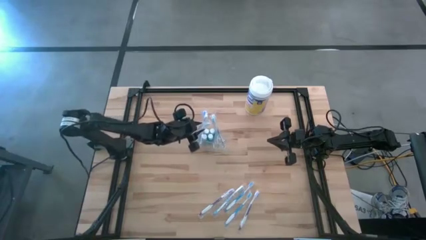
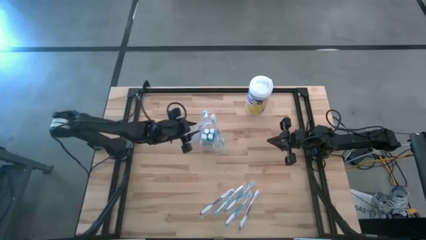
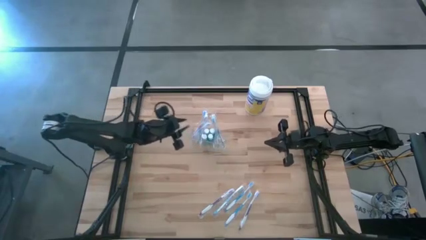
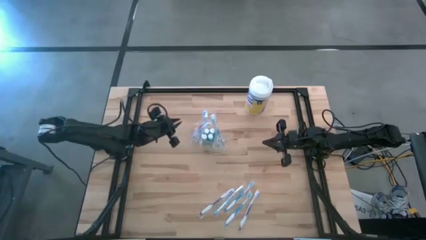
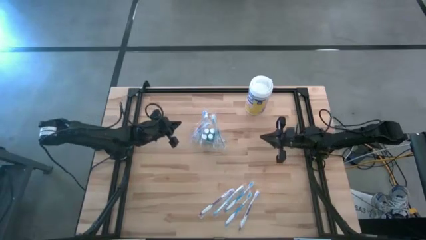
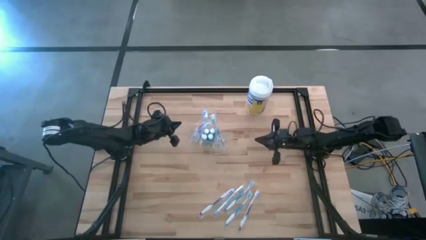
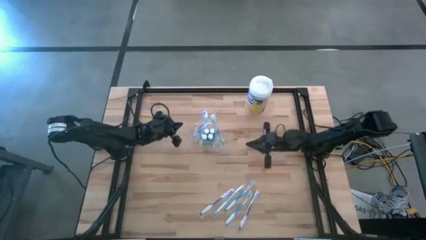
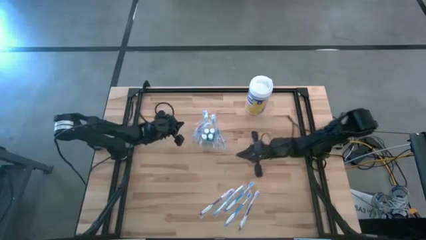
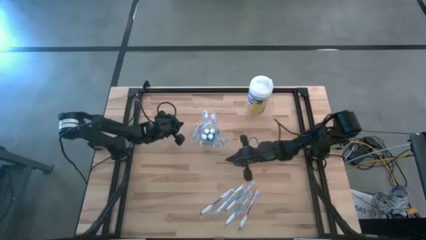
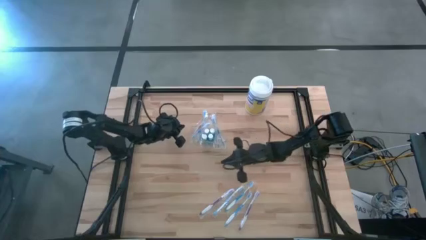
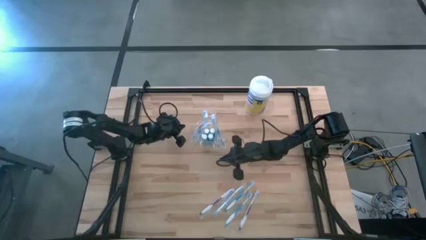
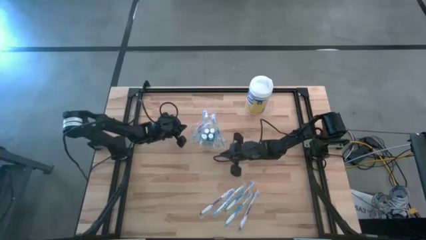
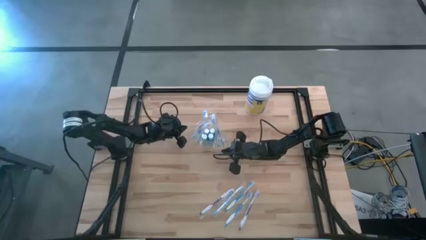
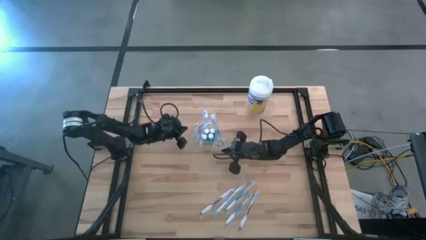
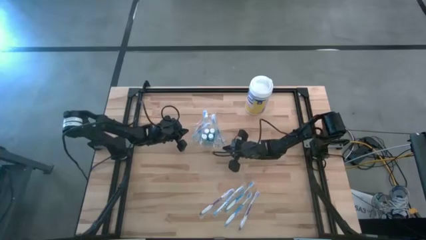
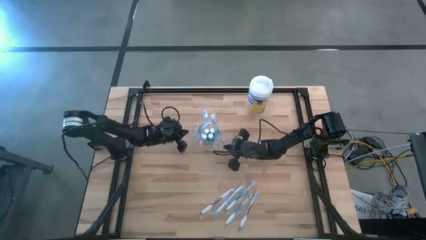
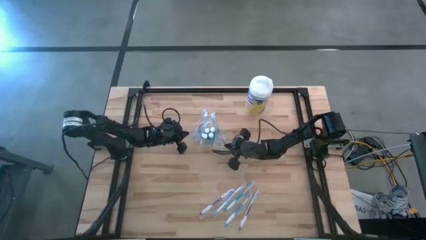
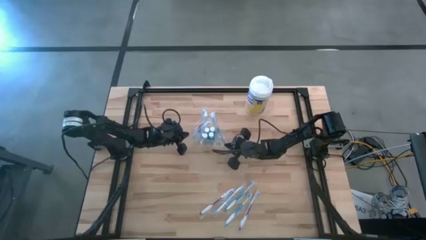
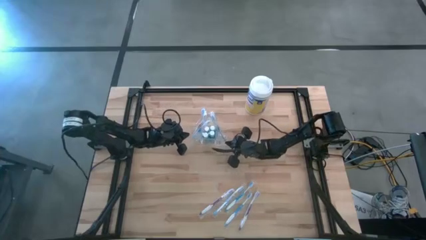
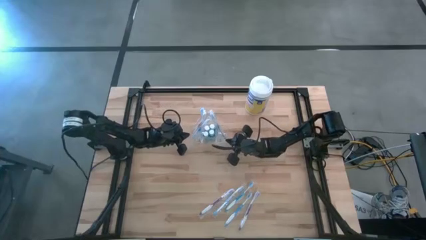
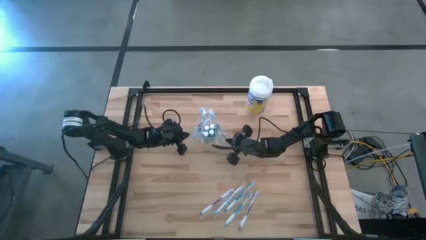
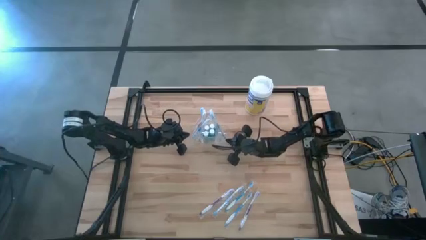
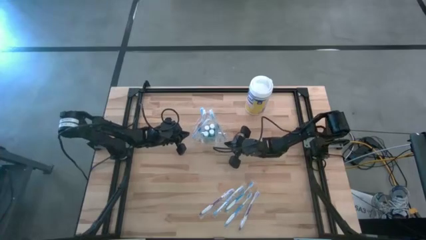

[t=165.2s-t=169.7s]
Task: Pick & Place toothbrushing station
Adjust the transparent organizer

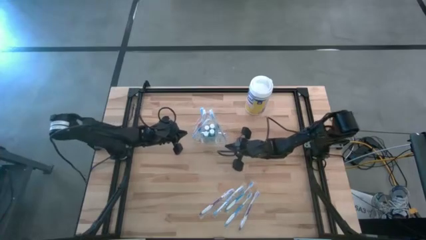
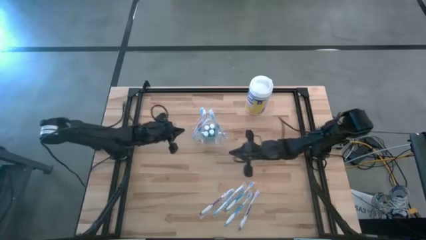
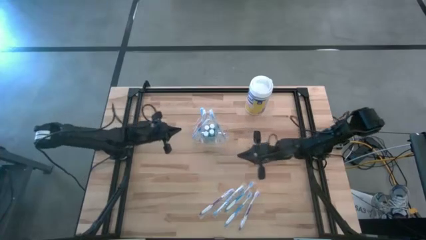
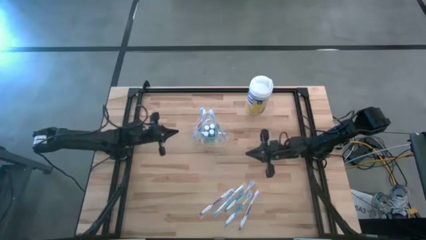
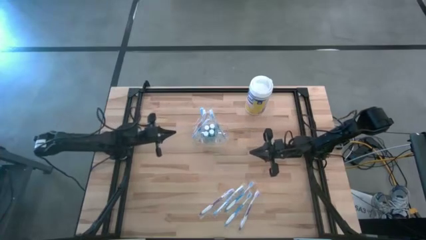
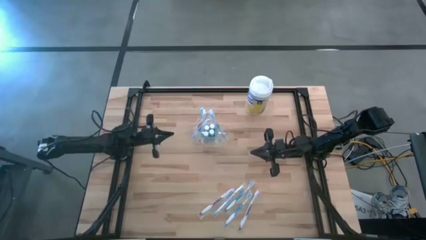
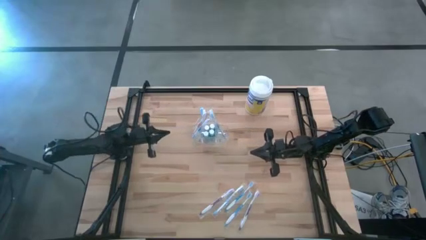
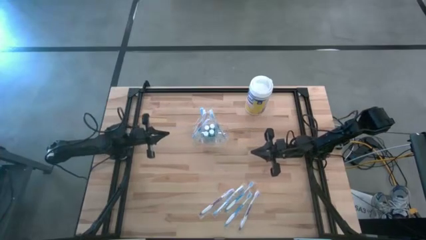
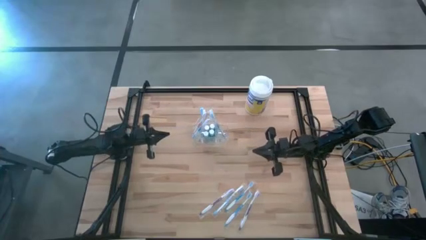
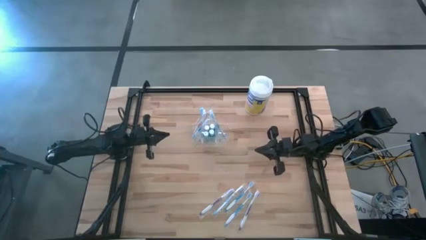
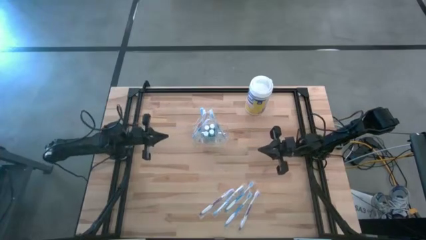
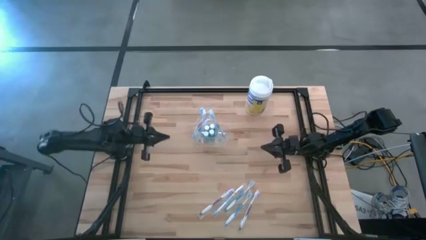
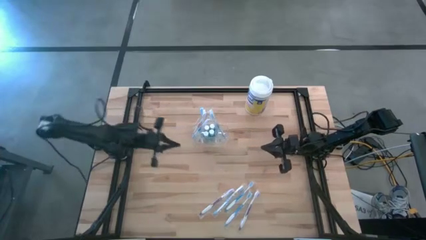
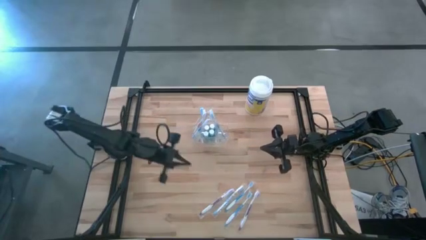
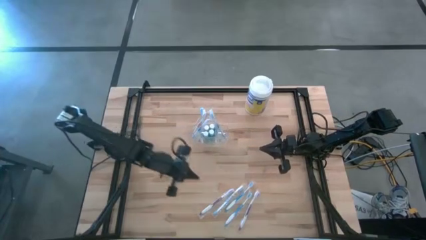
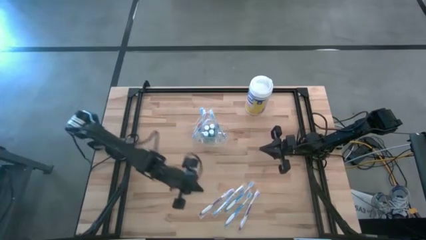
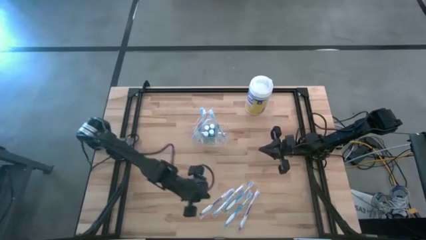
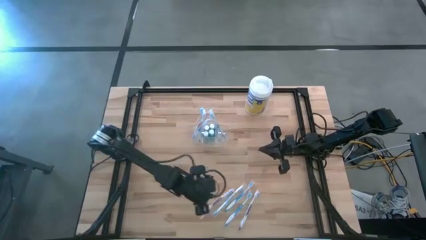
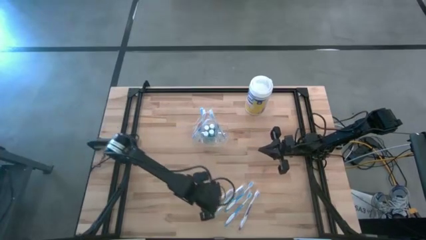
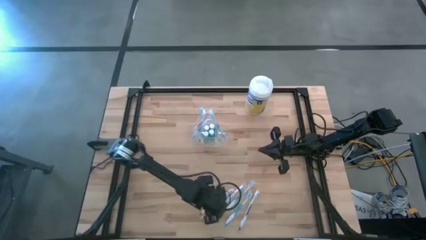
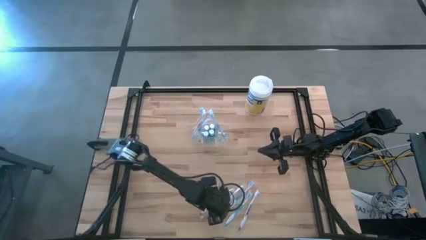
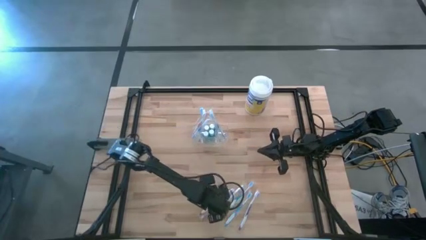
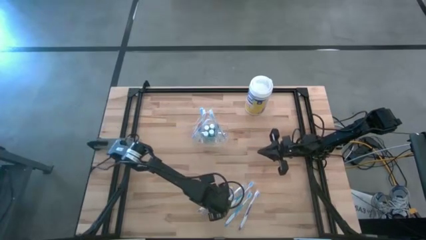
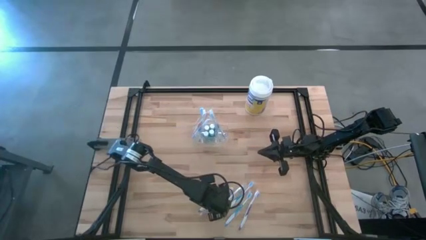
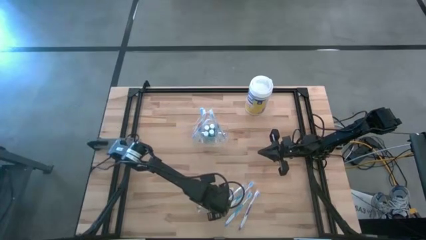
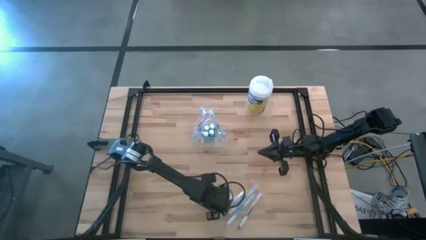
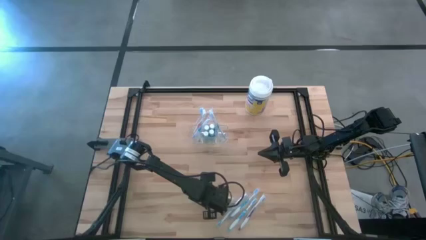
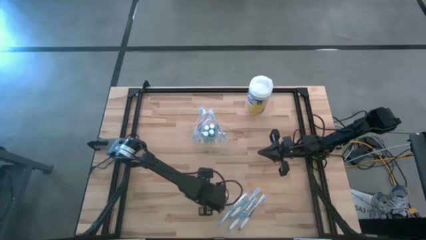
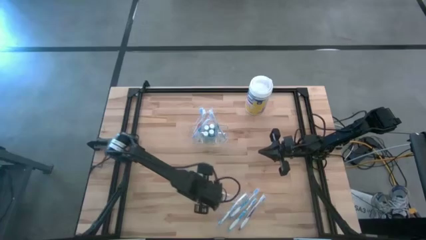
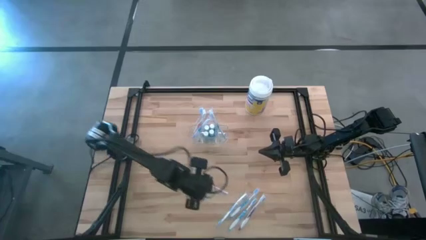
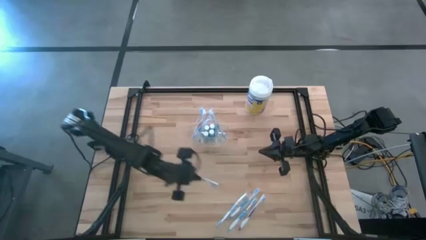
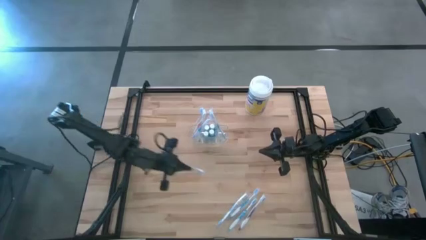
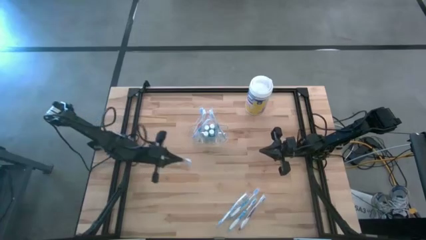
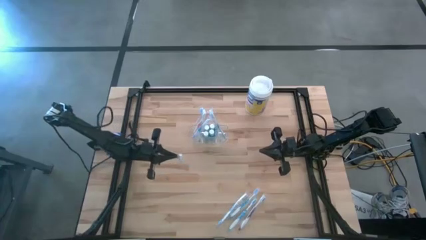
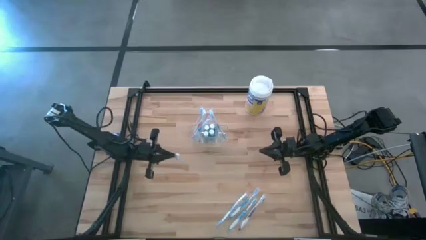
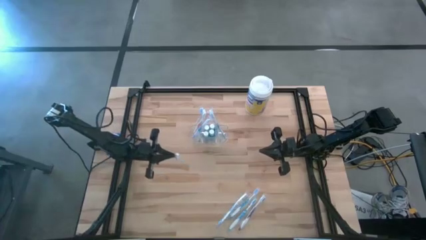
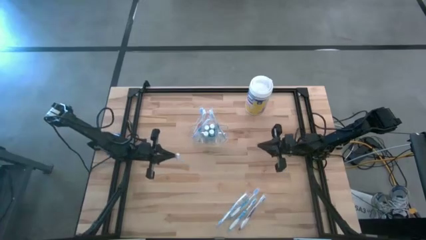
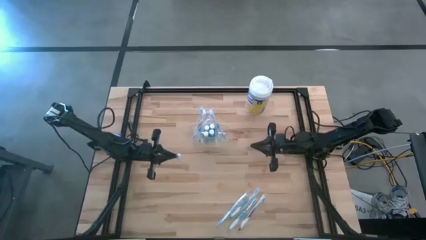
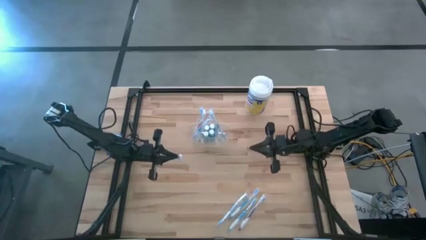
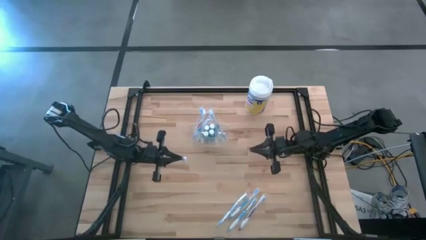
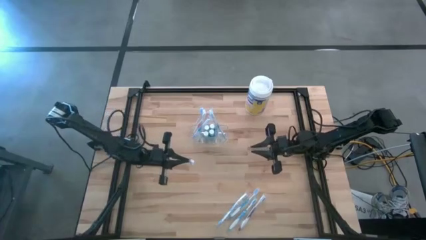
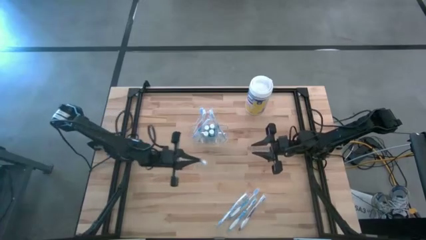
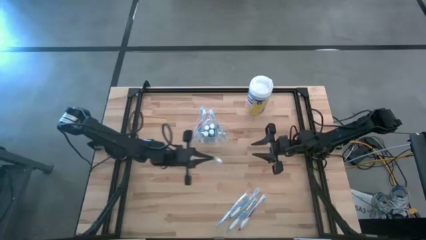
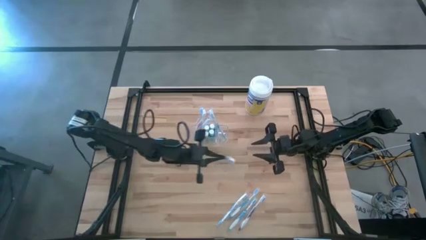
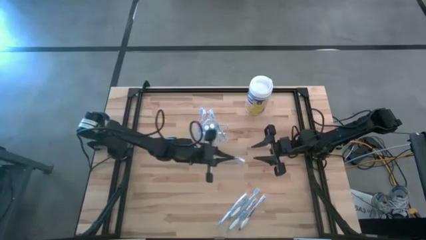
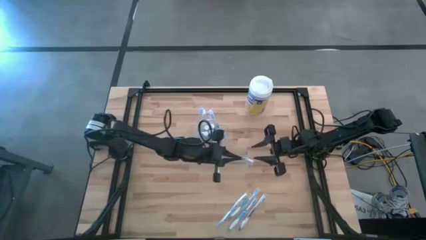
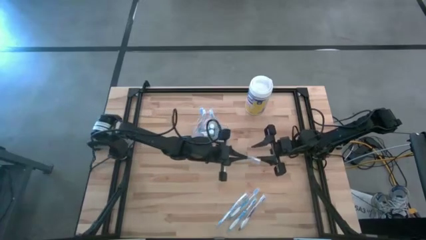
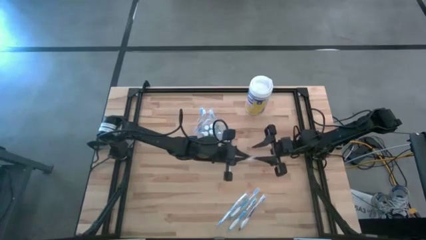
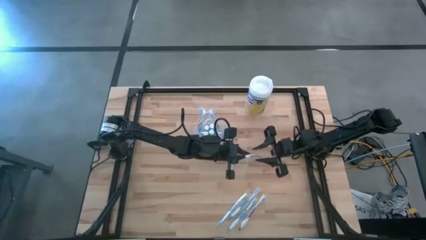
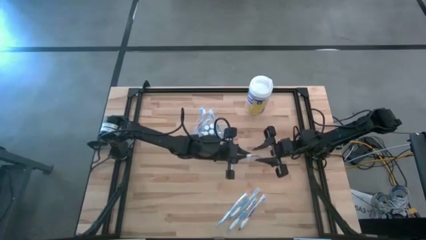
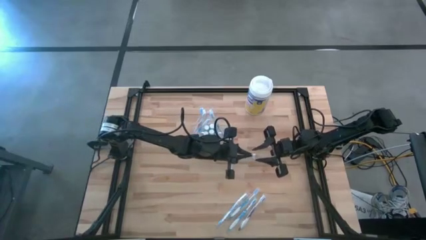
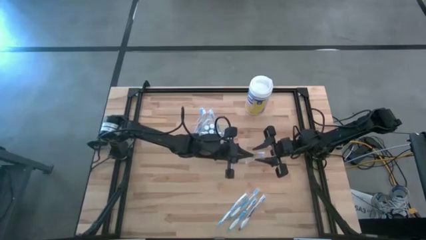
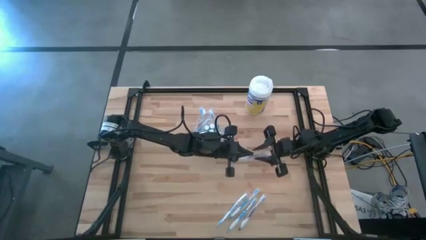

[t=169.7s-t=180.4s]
Put the purple toothbrush into the transparent organizer

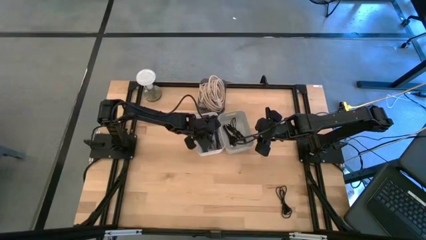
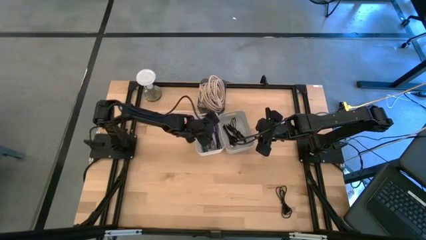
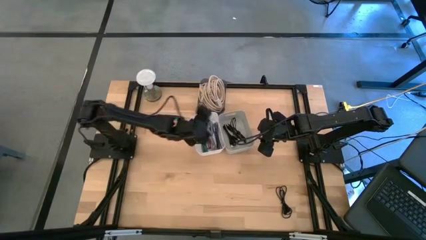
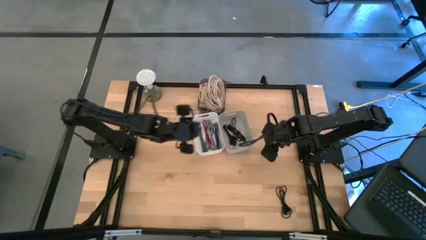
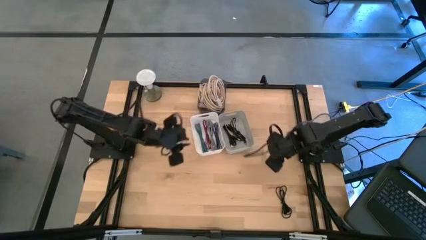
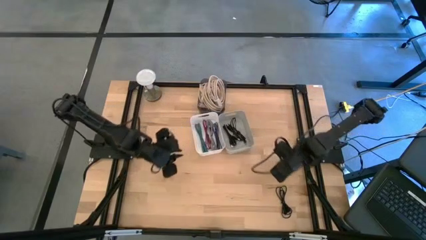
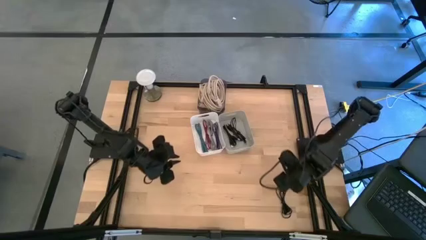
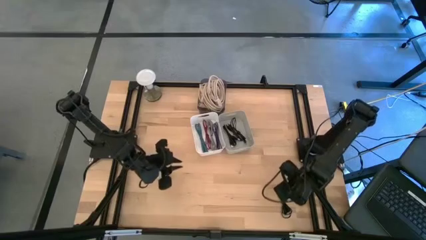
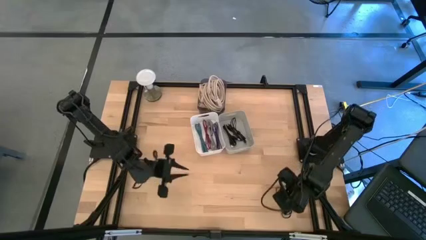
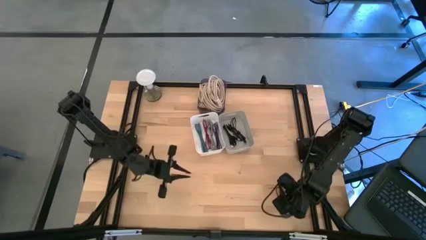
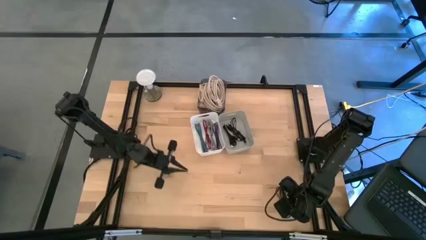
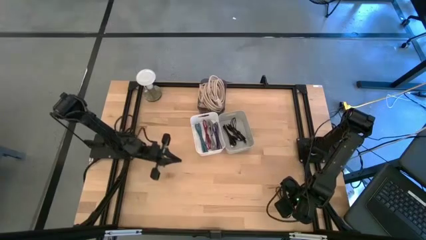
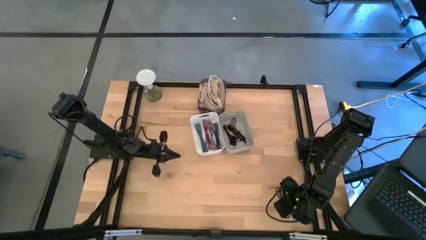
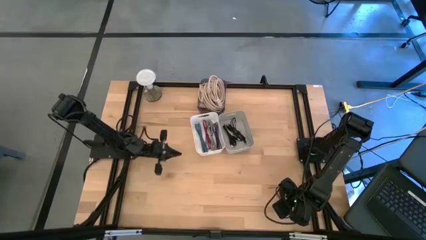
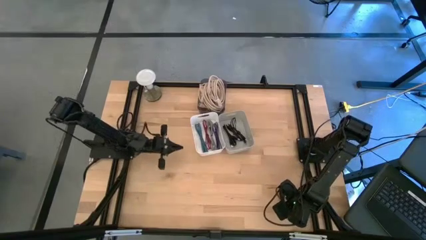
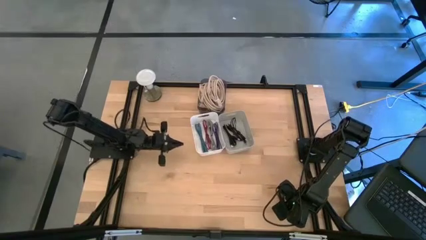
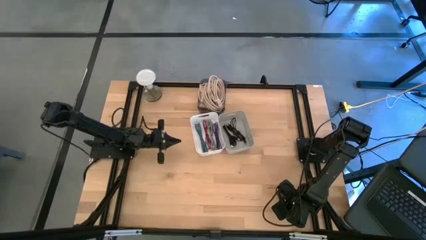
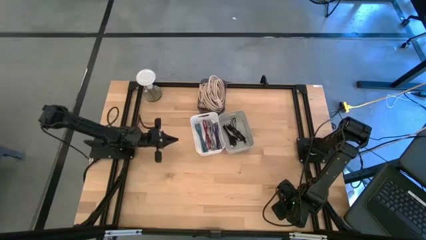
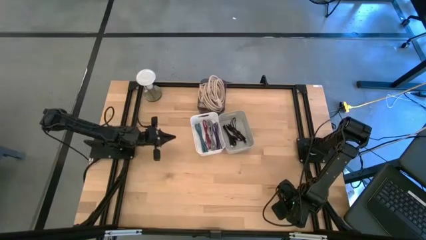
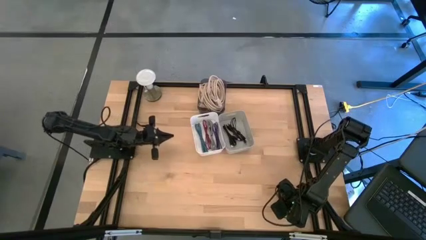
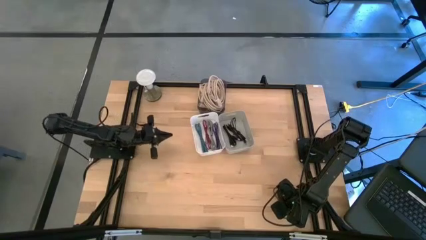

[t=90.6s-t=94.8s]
Task: Pick & Place USB Port
Put the black charger cable into the gray bin
